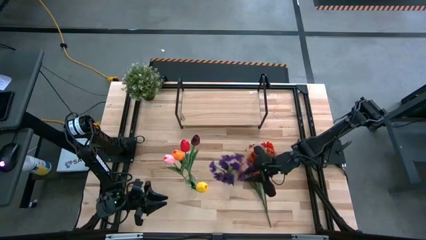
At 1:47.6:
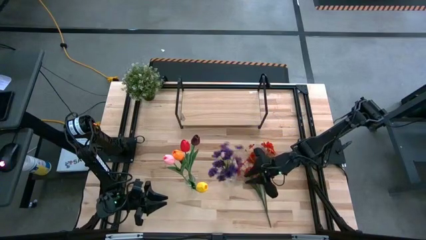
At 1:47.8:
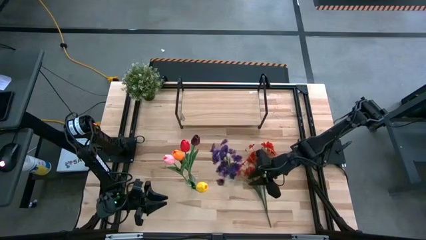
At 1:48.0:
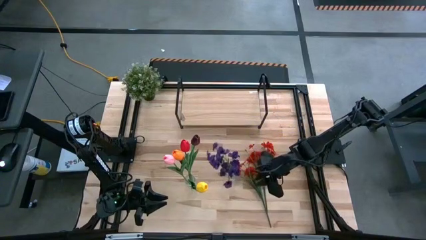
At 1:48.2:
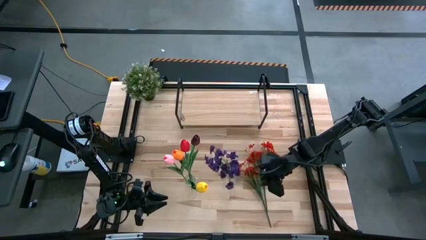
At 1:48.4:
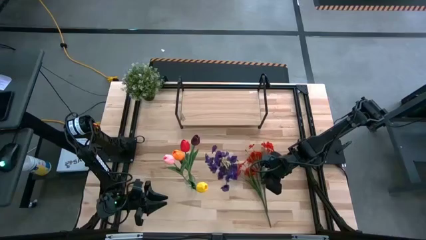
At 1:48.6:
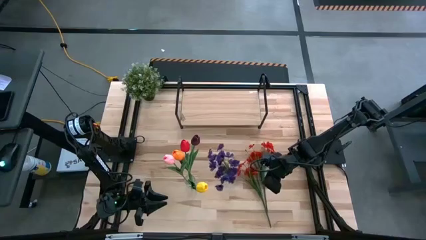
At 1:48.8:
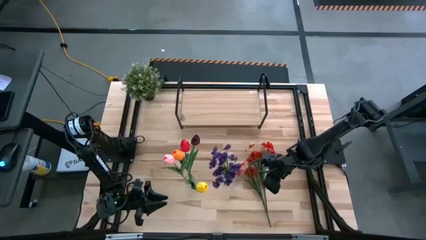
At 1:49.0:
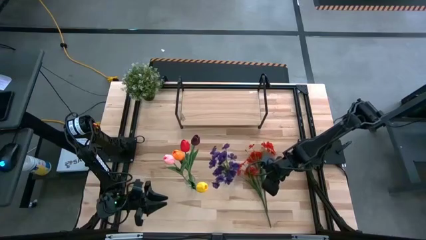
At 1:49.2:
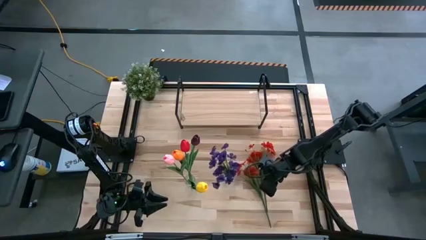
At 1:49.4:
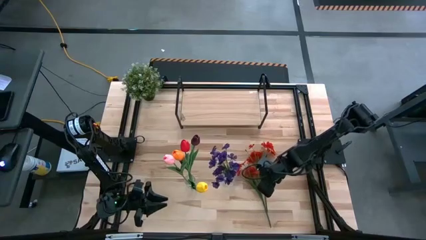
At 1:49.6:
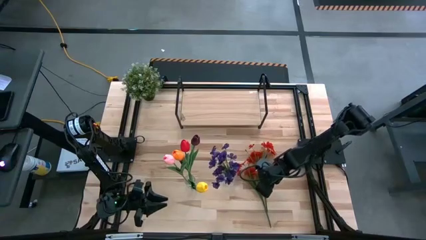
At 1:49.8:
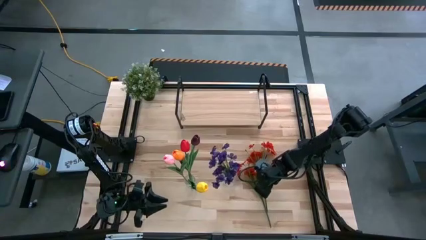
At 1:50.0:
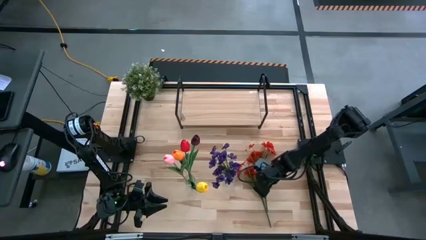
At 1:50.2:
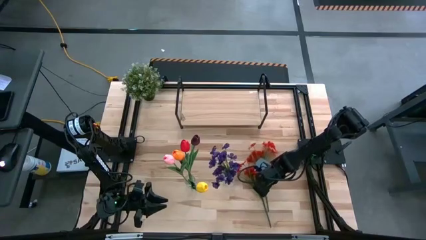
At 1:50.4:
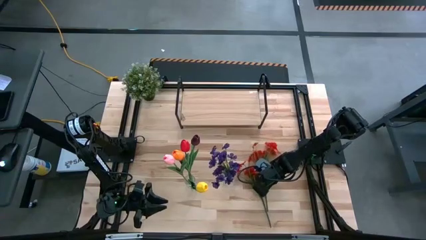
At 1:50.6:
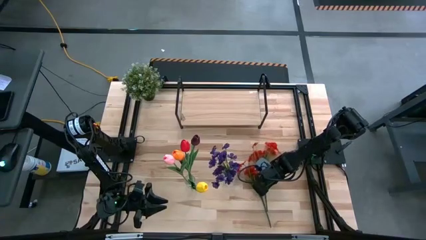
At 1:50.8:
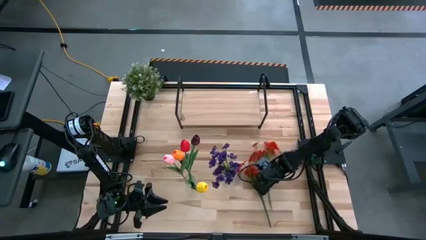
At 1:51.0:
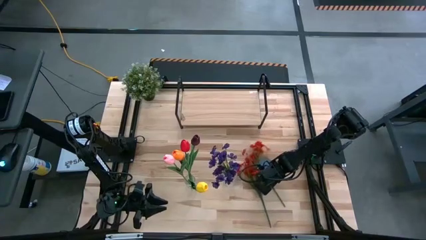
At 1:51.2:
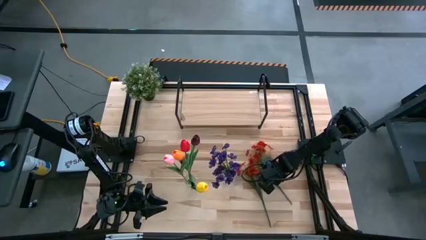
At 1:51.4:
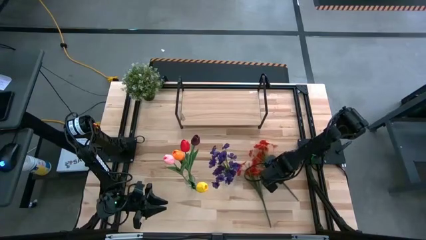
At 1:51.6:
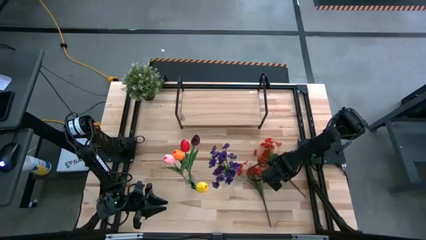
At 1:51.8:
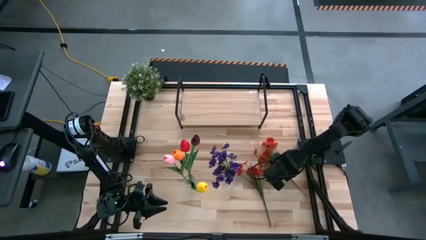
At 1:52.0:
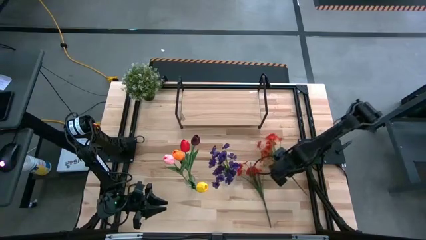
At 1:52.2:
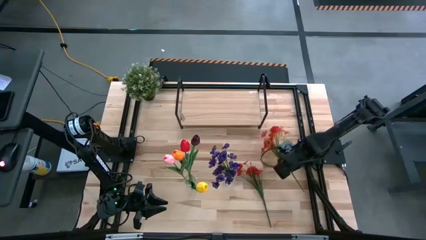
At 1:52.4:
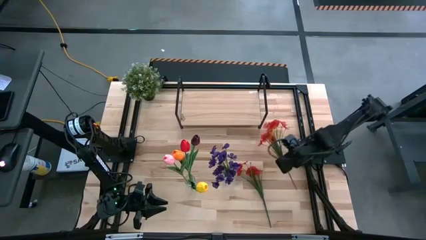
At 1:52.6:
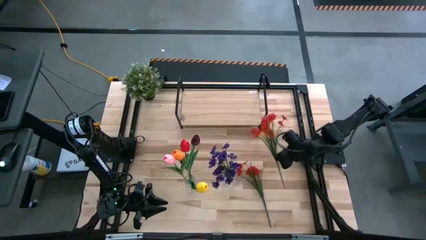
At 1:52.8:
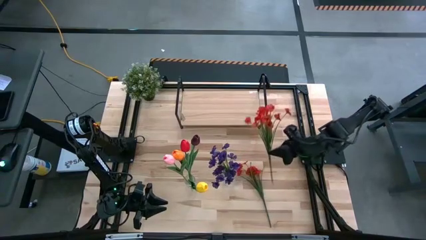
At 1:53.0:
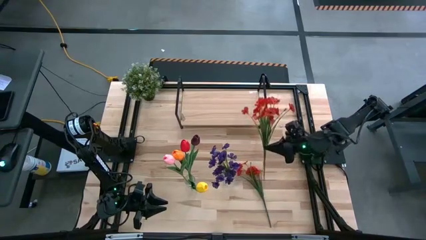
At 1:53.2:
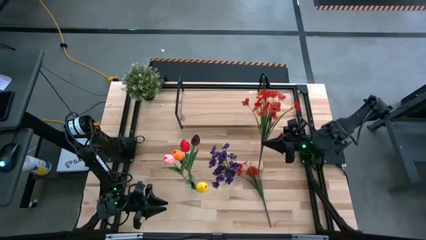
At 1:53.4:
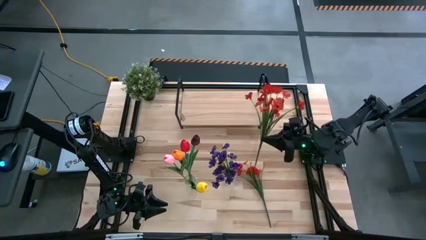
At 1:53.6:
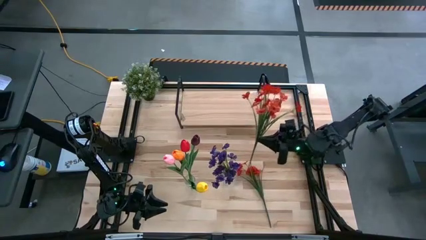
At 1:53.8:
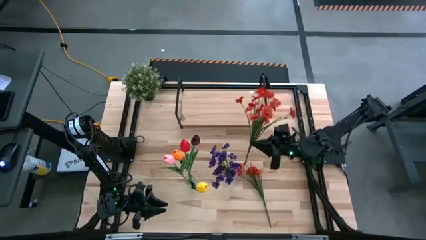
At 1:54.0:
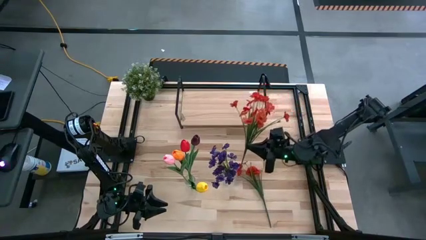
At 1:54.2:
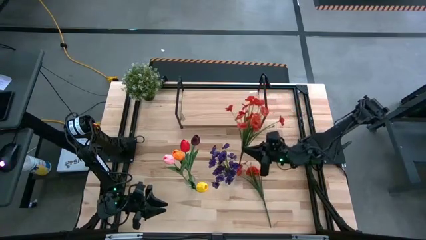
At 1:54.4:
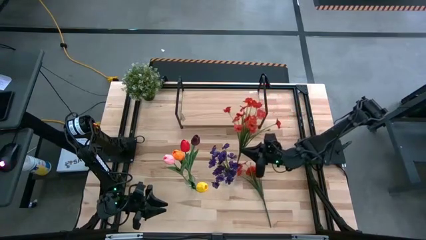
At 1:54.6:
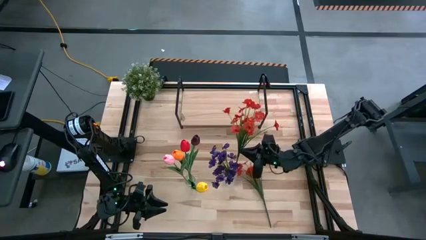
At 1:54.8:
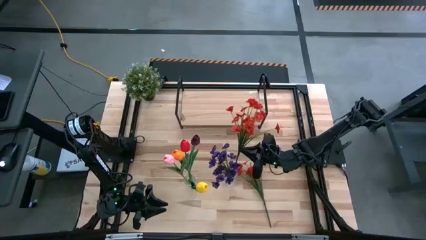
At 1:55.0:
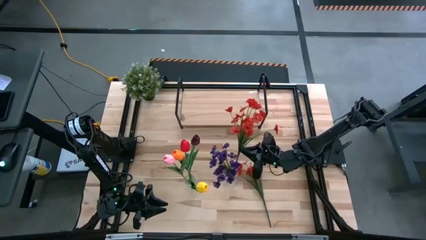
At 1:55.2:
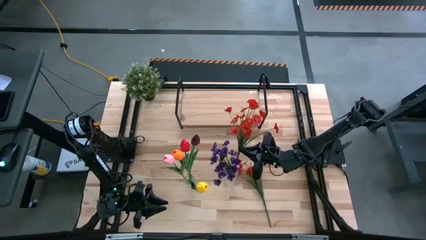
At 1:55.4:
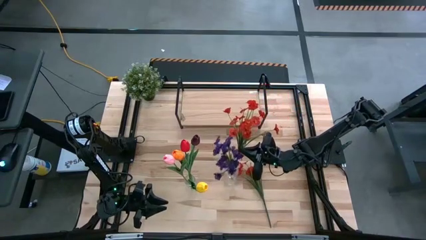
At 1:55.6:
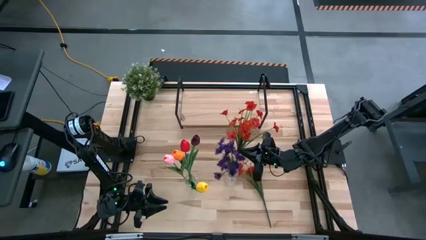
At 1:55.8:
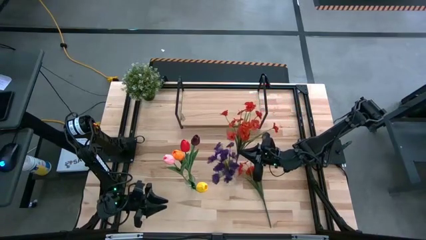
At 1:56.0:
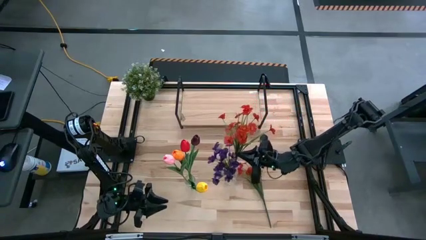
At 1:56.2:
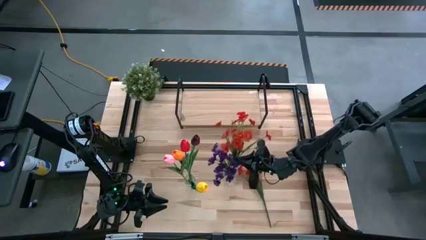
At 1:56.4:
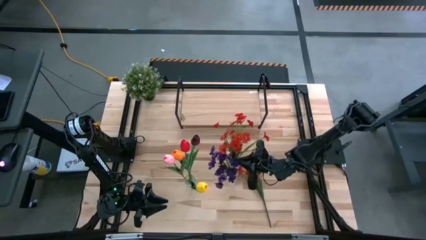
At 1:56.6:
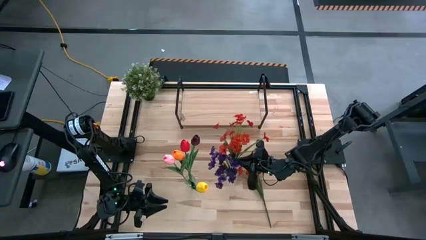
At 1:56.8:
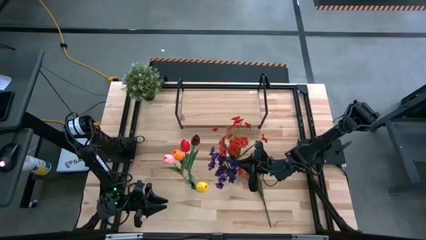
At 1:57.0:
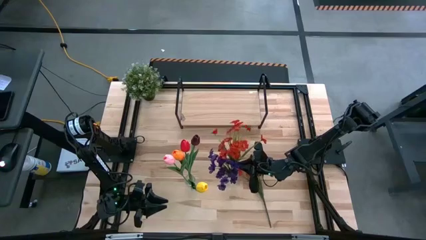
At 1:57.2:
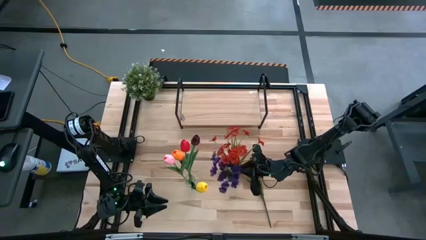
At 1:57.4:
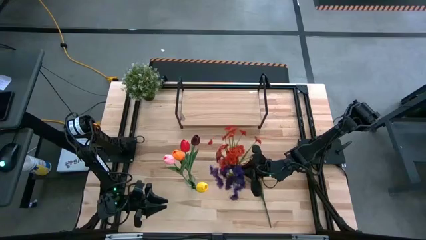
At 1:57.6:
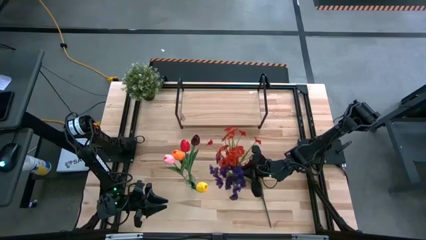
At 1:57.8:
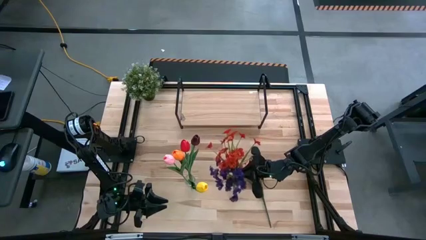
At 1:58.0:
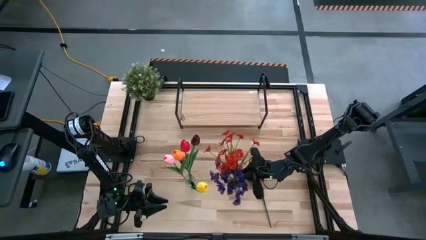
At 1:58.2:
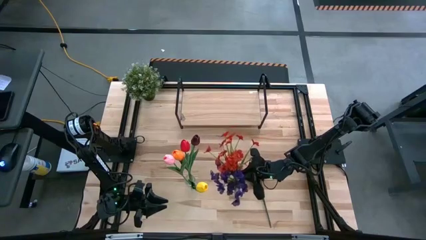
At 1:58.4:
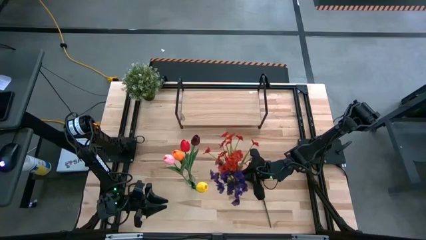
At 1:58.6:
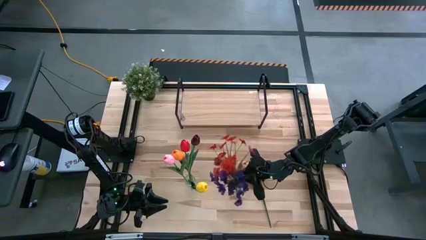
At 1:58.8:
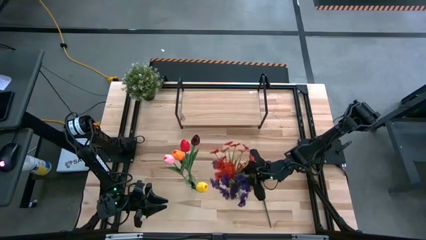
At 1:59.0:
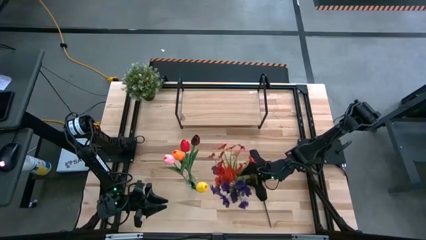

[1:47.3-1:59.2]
Task: Pick and place flowers into a vace then onto a shelf
Put the right red flower into the right transparent vase
